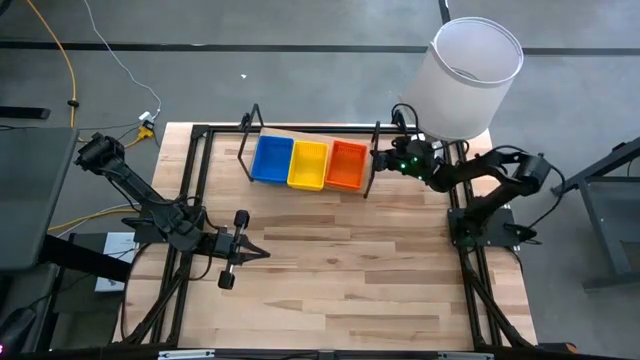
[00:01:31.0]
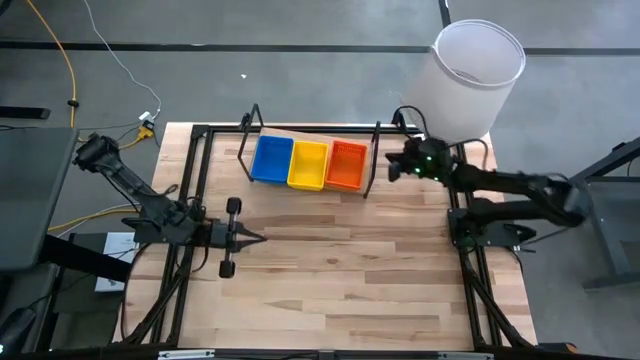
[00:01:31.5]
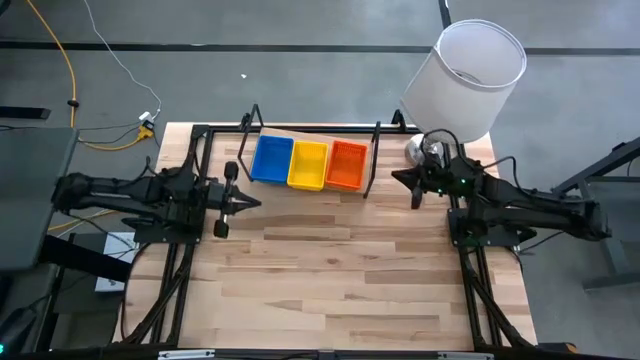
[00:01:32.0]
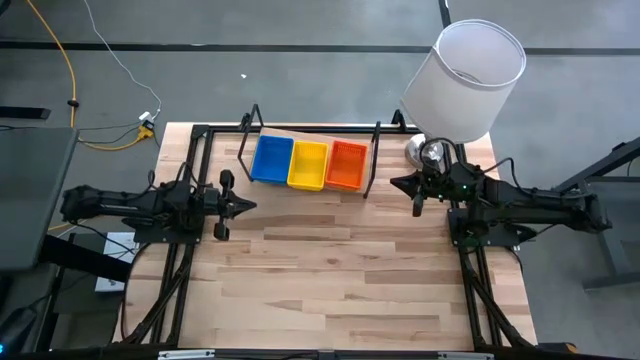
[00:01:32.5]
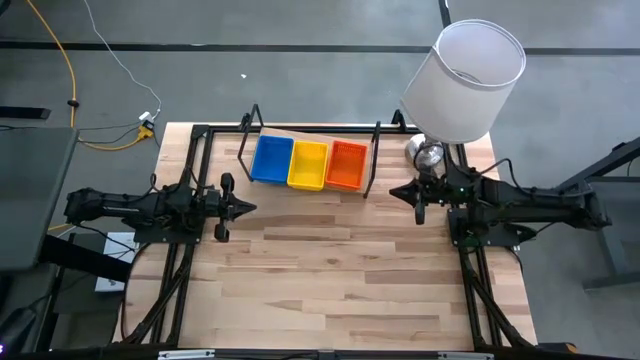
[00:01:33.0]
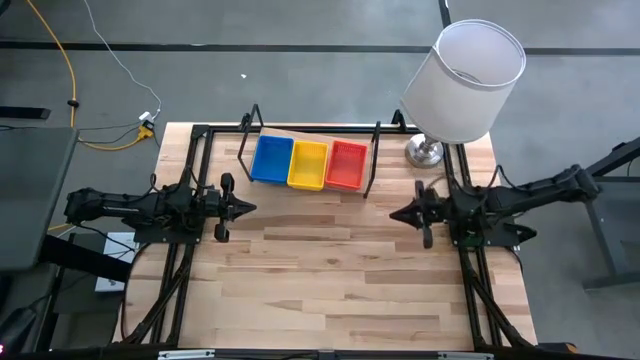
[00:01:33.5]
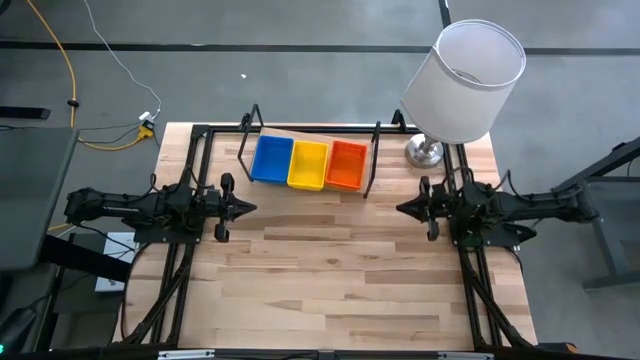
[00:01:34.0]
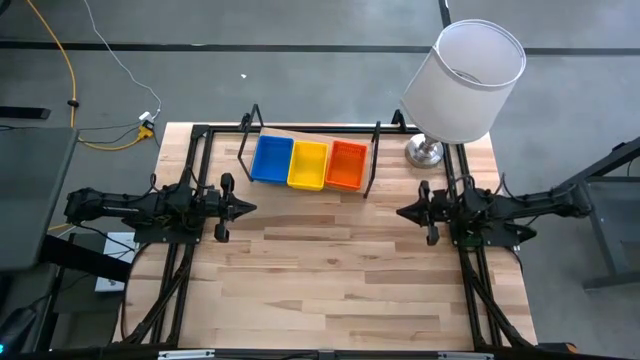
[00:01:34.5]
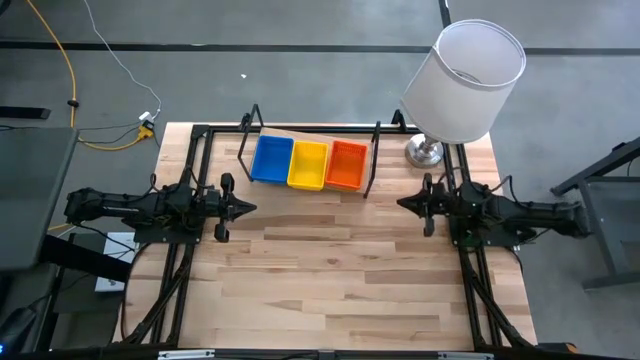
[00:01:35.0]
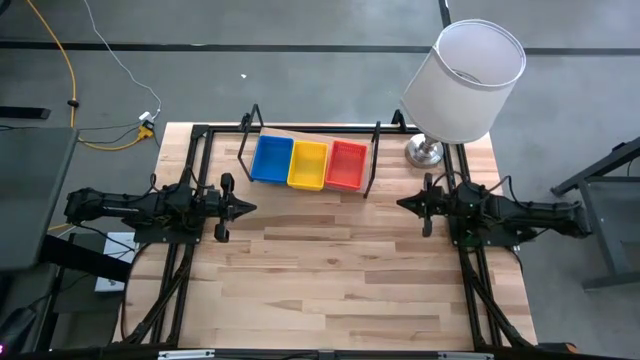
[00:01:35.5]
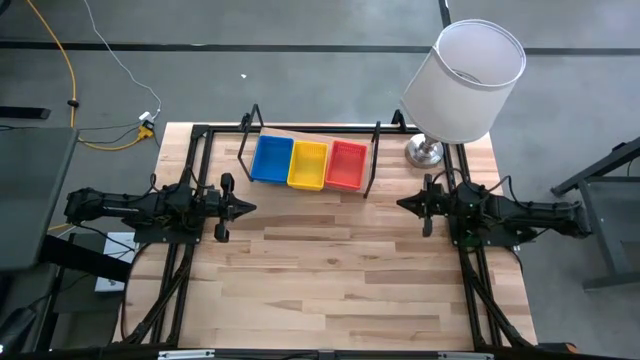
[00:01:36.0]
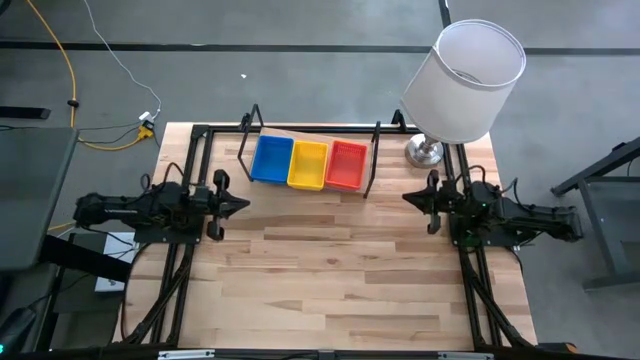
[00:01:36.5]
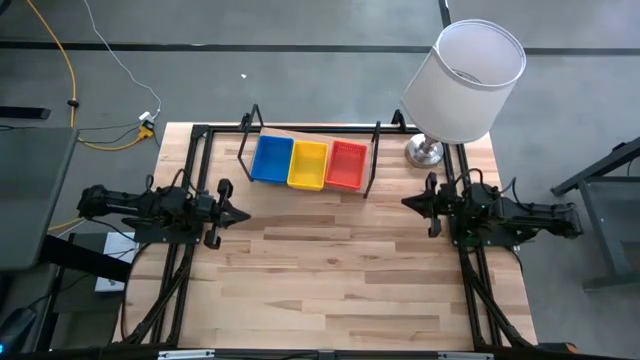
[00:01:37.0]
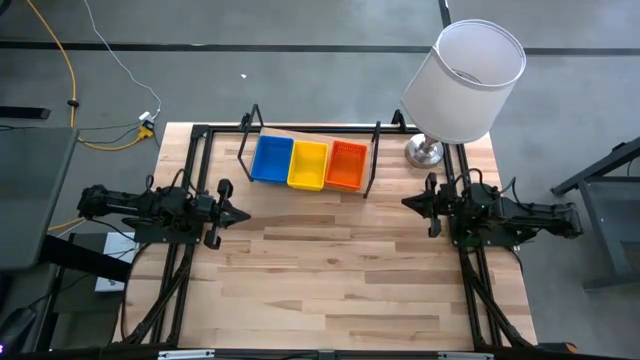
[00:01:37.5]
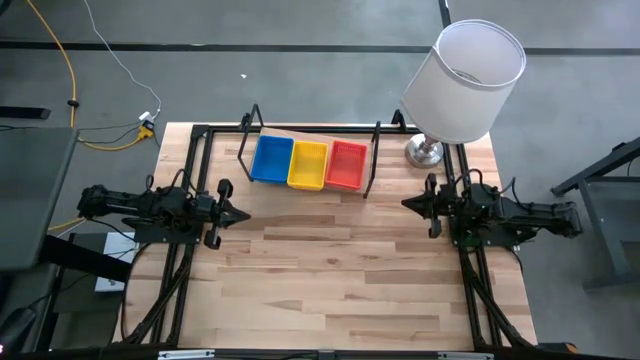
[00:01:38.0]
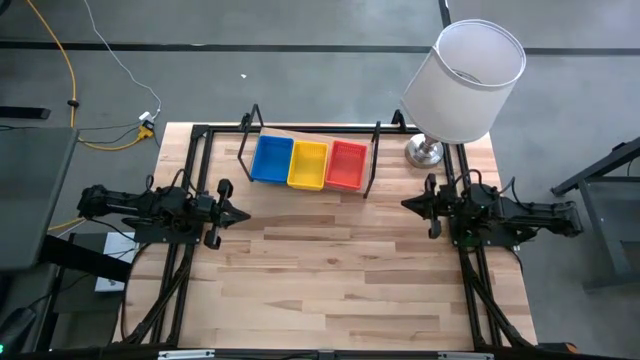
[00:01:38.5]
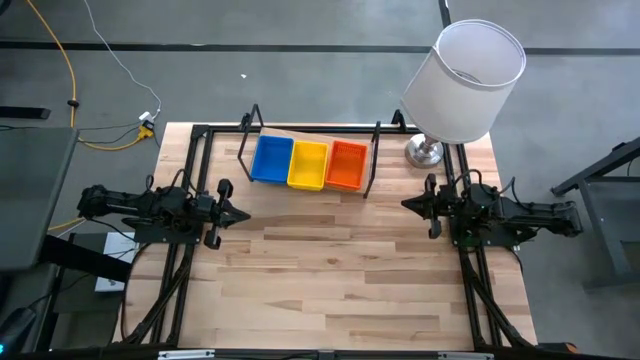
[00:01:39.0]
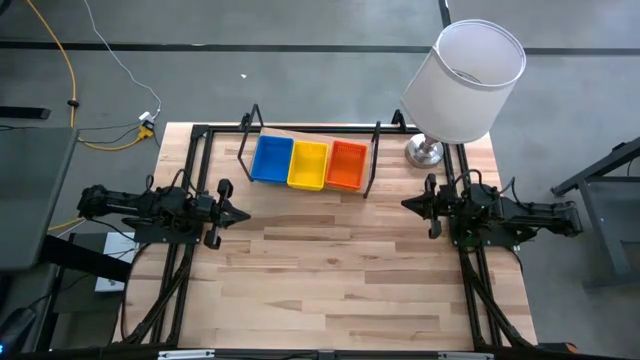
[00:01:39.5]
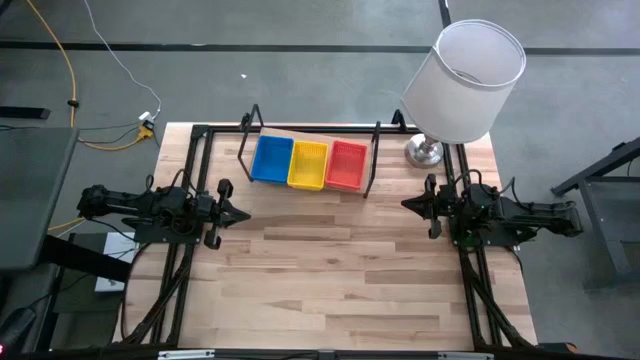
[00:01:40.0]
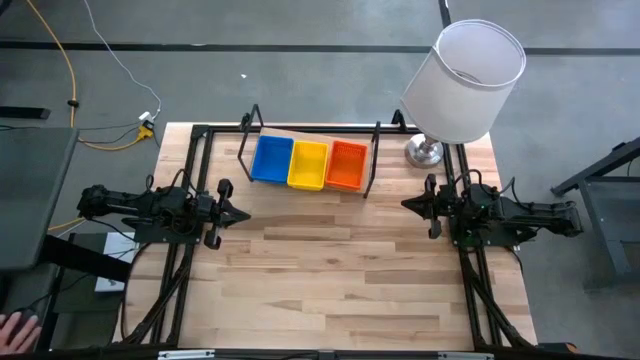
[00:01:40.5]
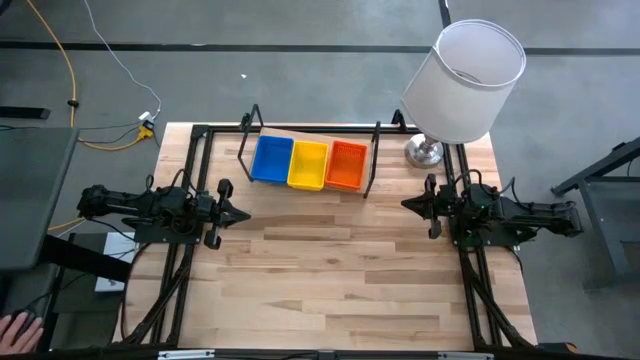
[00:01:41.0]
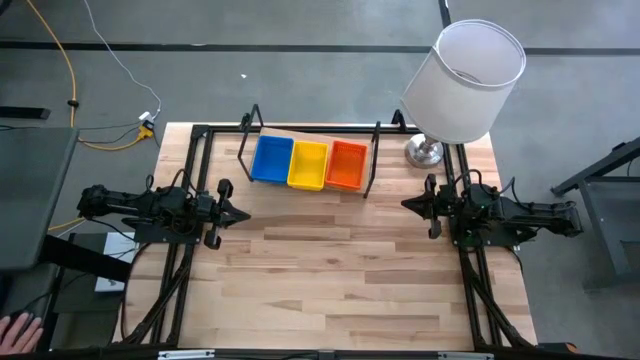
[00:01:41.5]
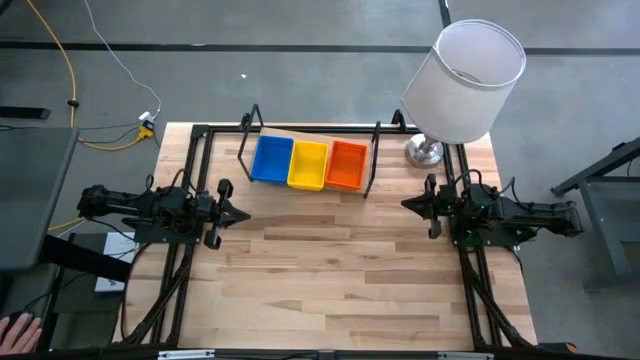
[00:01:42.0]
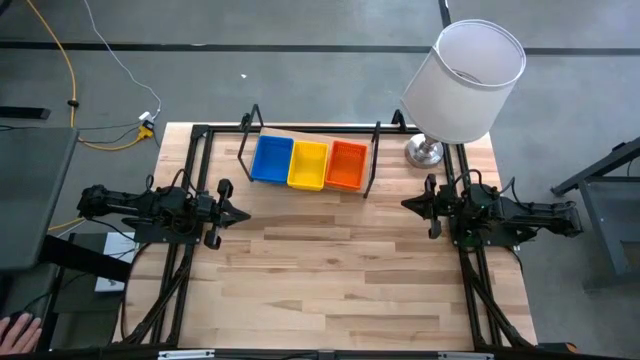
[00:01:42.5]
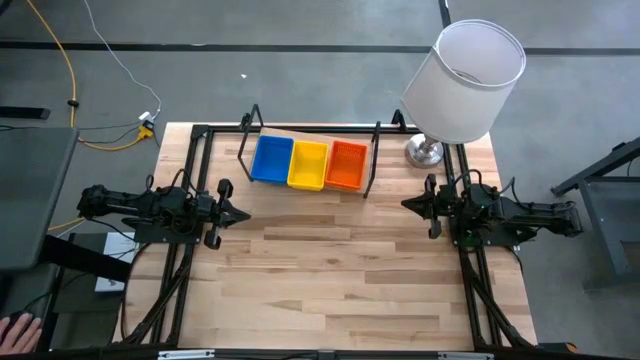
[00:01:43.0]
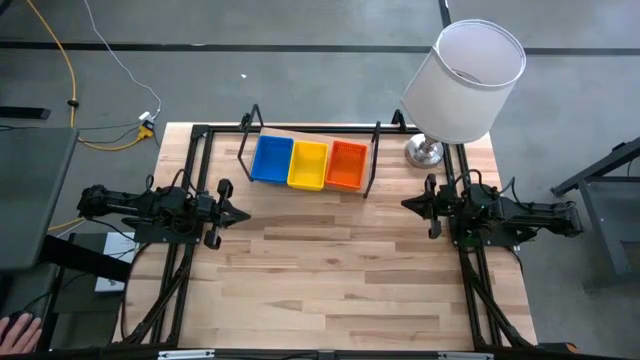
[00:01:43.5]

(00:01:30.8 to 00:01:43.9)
Task: Stack baskets on shelf by color
Return to Home Position

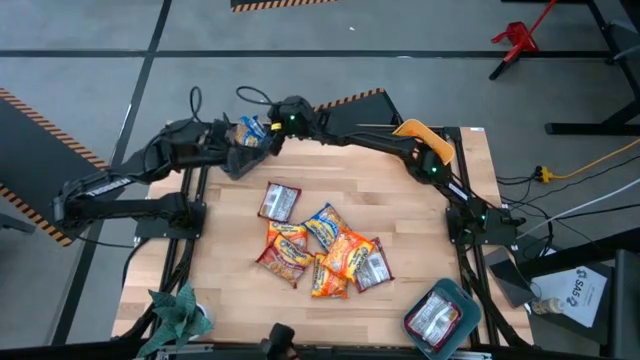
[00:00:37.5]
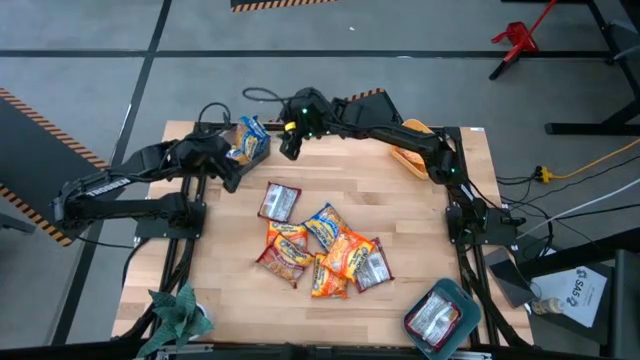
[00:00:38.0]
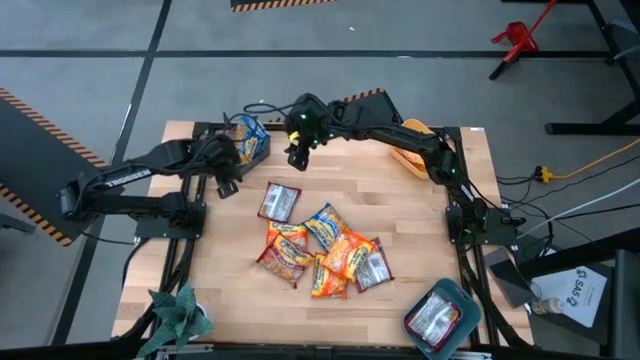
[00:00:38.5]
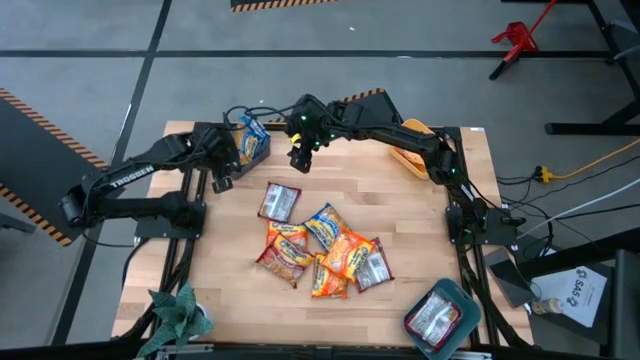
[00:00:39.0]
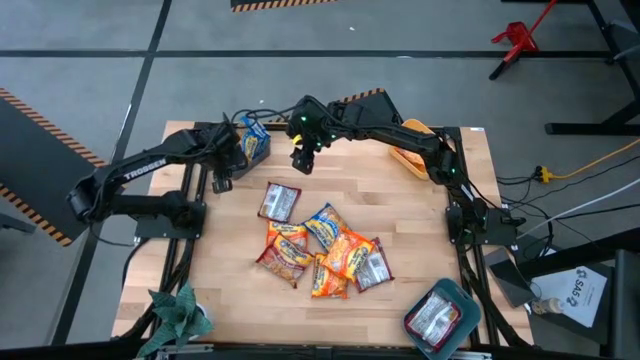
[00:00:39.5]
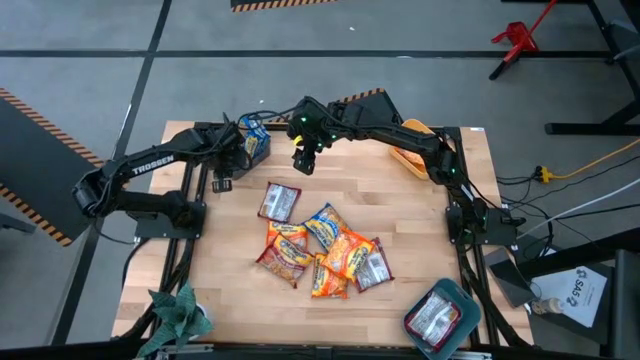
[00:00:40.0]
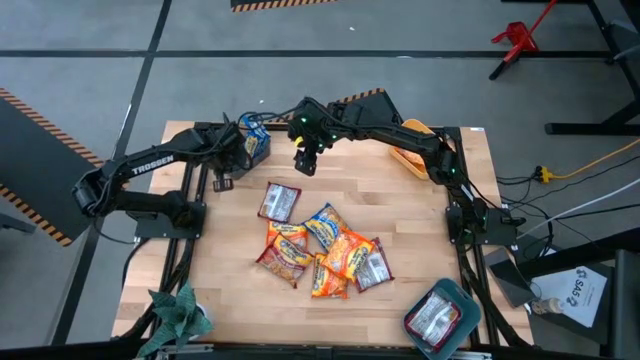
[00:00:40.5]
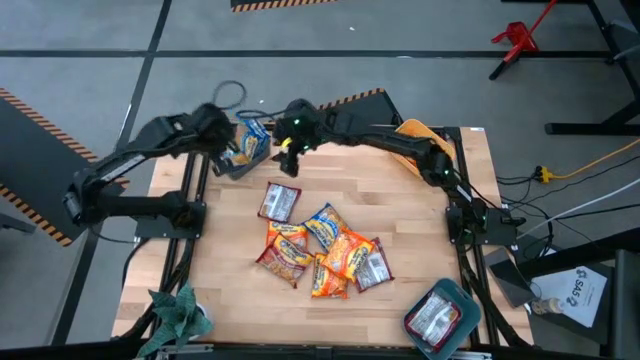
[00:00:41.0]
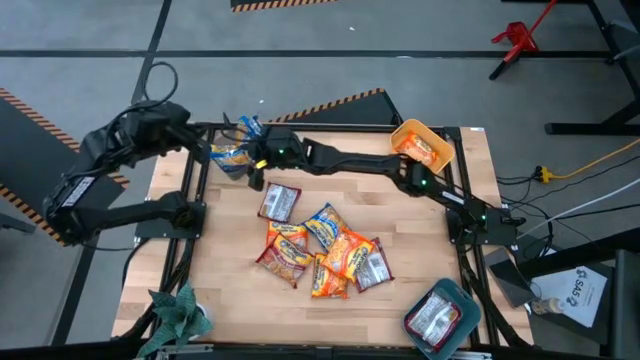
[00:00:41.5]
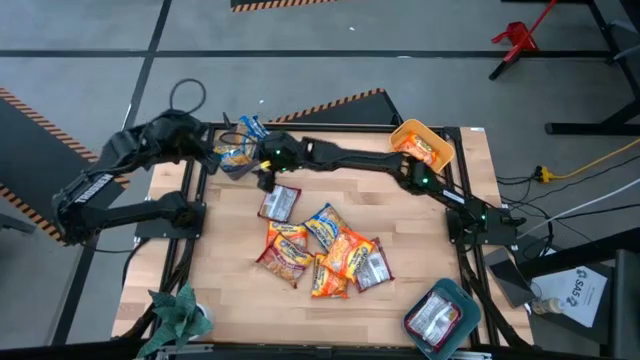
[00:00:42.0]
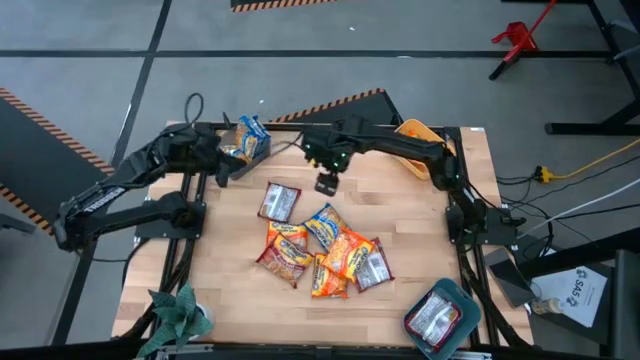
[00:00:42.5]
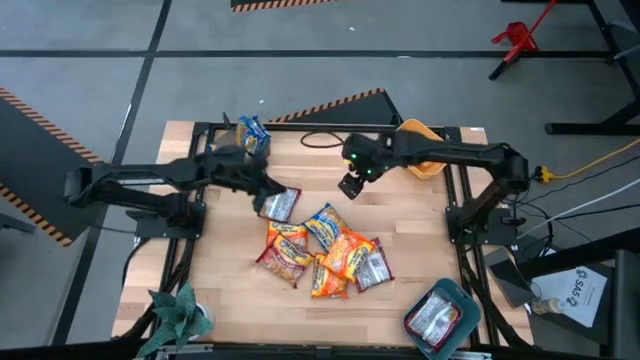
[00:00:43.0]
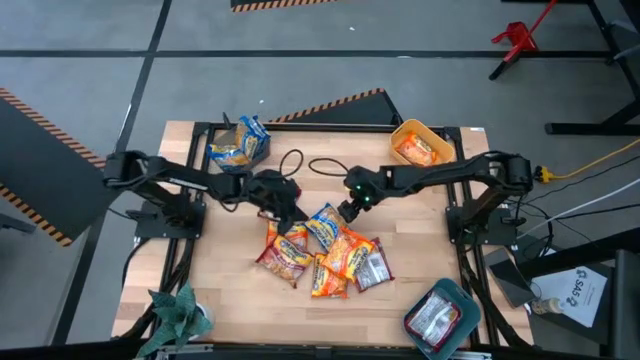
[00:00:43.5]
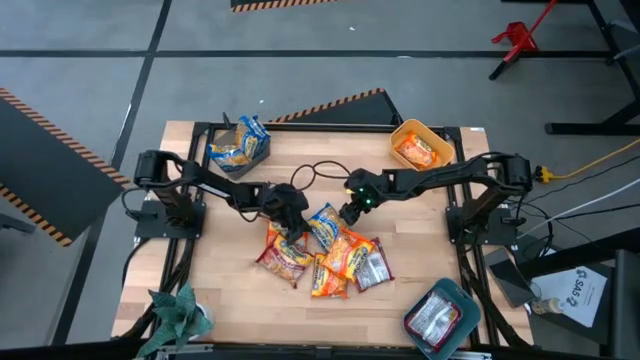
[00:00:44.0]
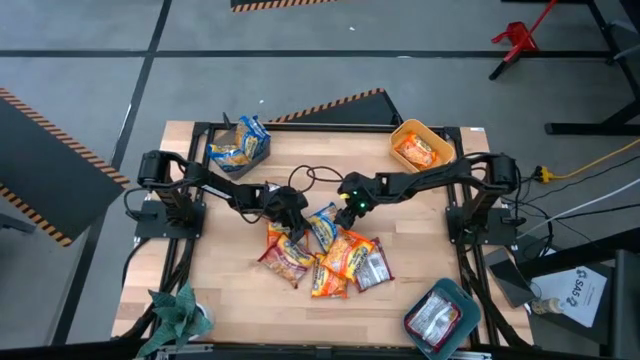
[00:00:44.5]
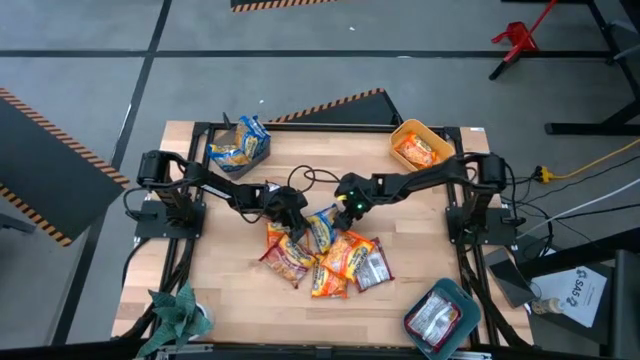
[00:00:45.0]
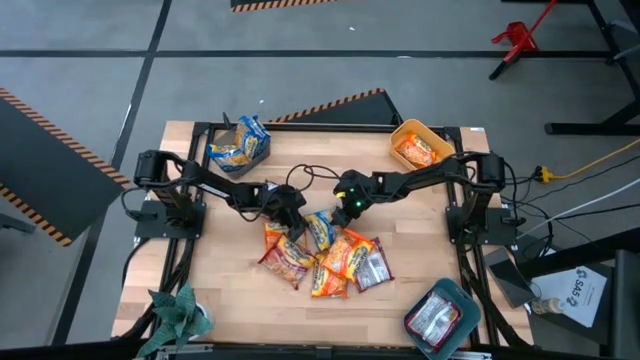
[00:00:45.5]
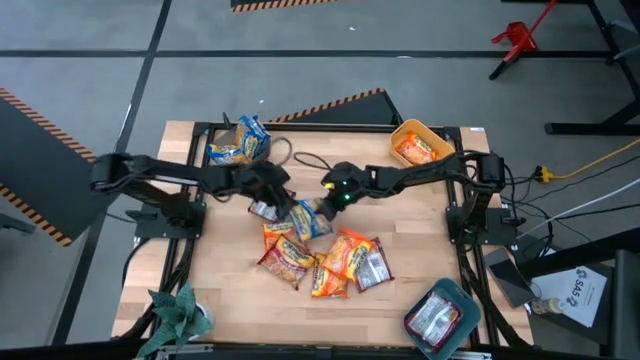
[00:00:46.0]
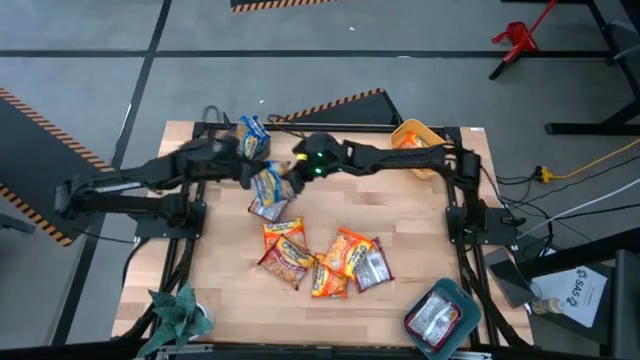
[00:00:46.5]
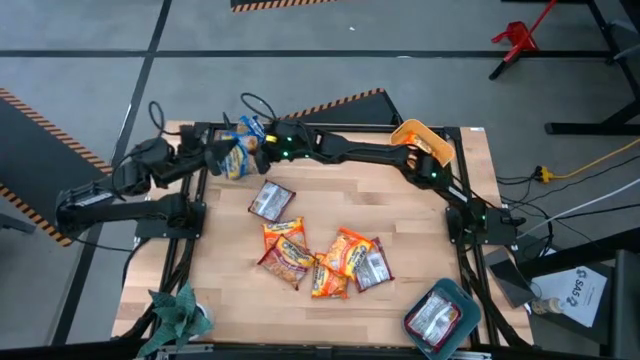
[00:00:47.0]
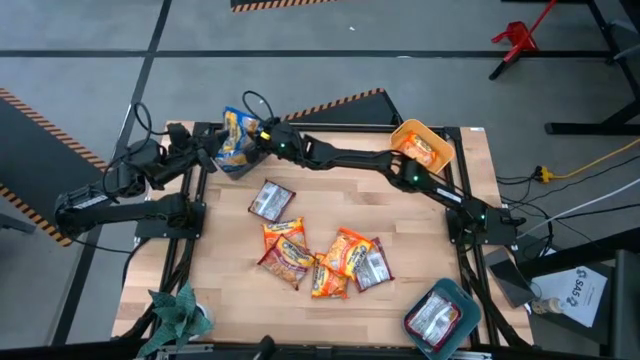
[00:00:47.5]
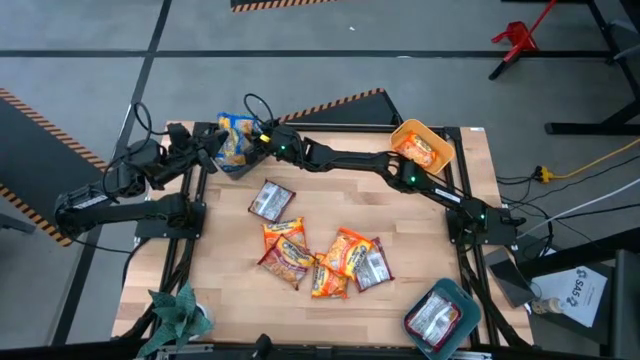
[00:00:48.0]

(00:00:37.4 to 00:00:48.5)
Task: Sort Maruchan noodles
Put the blue noodle pack into the black bin
